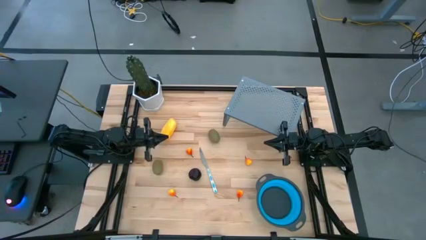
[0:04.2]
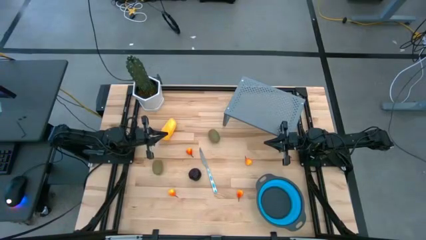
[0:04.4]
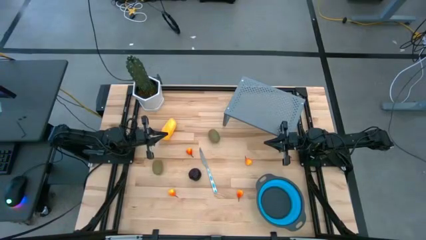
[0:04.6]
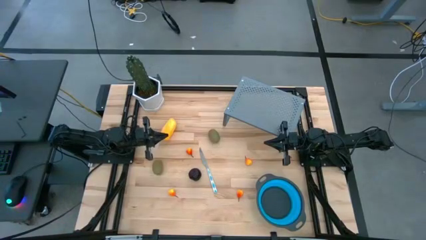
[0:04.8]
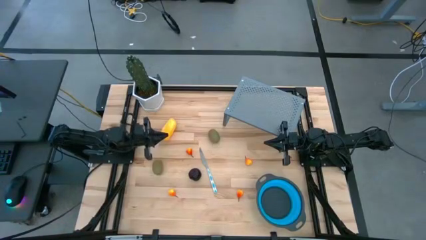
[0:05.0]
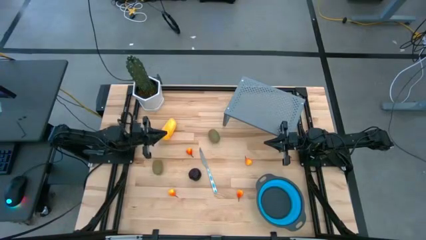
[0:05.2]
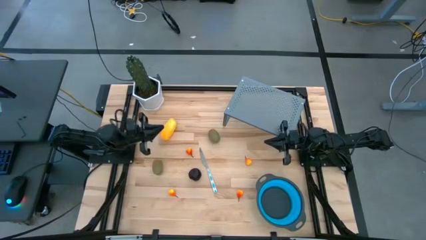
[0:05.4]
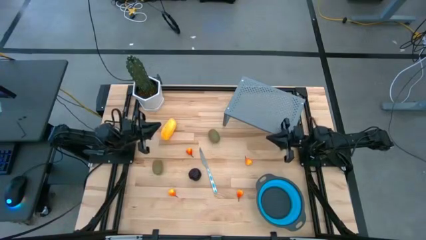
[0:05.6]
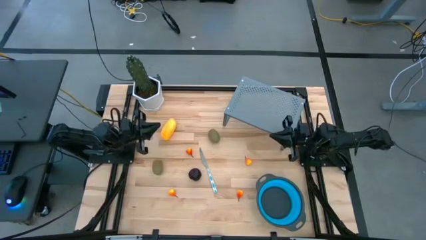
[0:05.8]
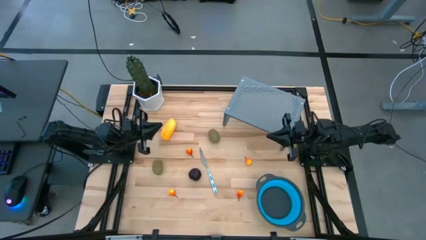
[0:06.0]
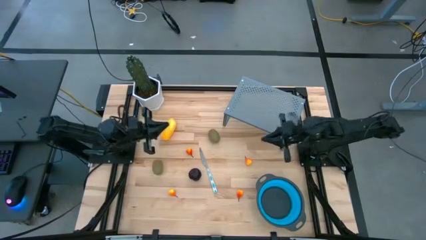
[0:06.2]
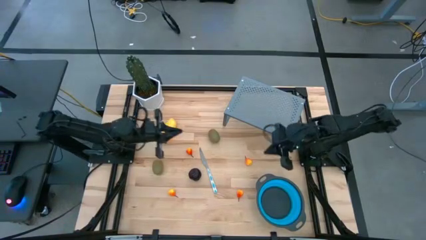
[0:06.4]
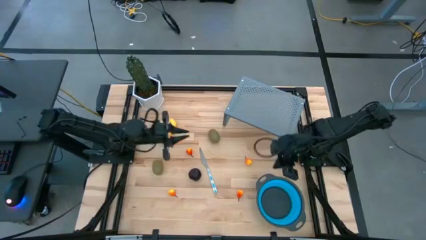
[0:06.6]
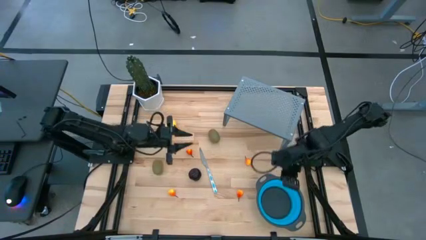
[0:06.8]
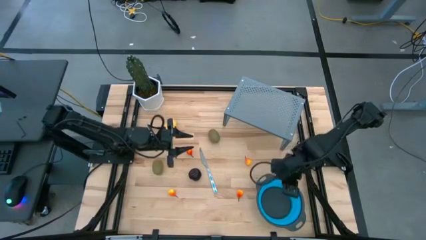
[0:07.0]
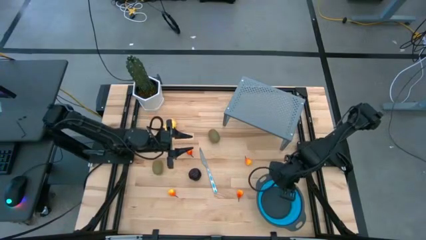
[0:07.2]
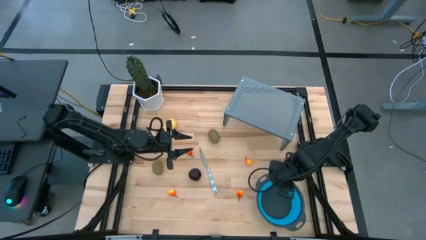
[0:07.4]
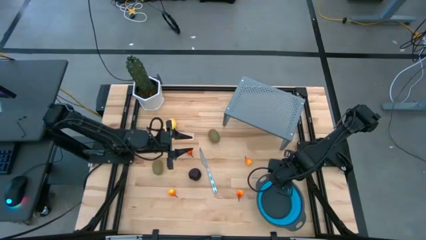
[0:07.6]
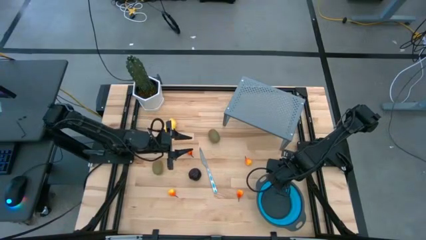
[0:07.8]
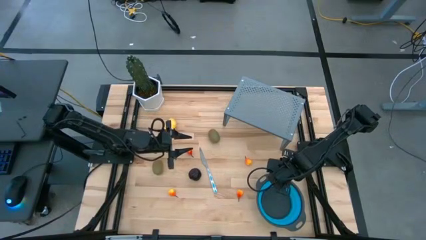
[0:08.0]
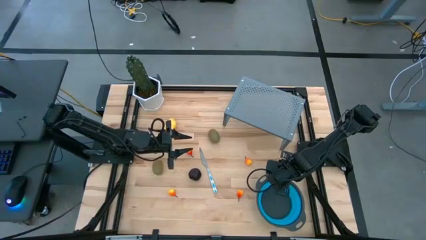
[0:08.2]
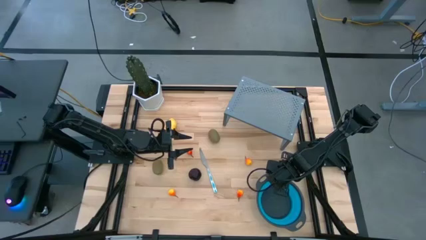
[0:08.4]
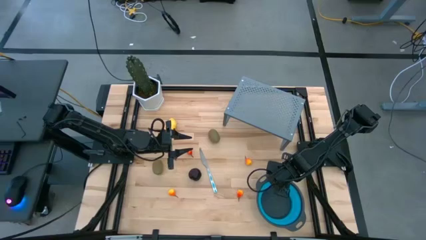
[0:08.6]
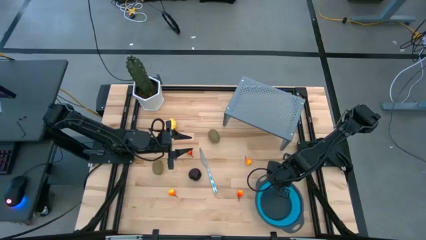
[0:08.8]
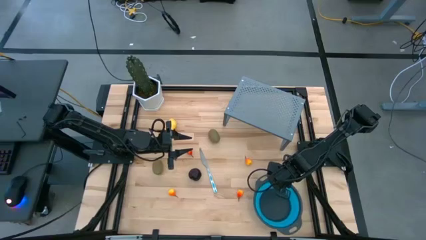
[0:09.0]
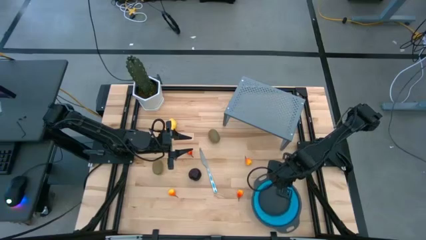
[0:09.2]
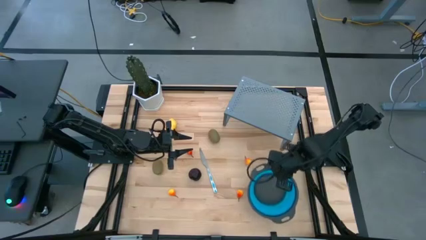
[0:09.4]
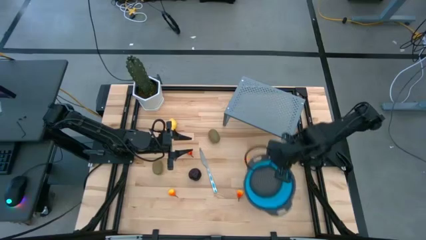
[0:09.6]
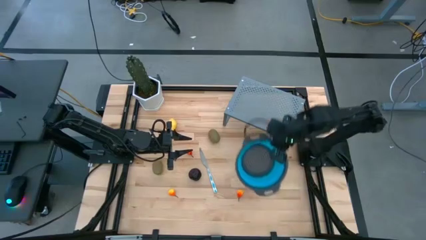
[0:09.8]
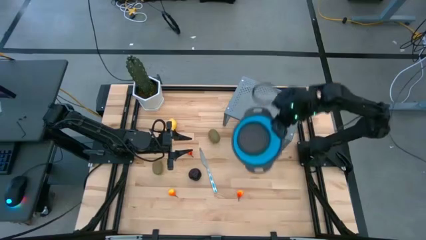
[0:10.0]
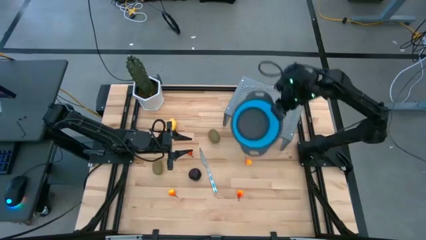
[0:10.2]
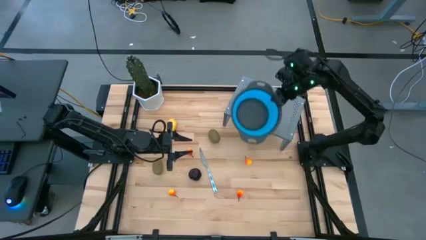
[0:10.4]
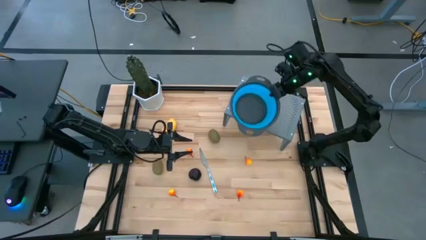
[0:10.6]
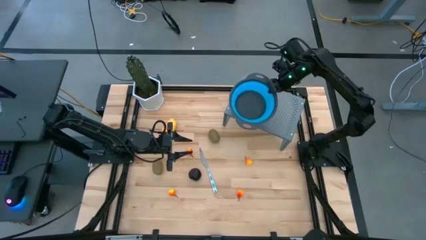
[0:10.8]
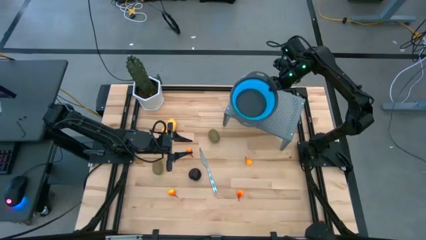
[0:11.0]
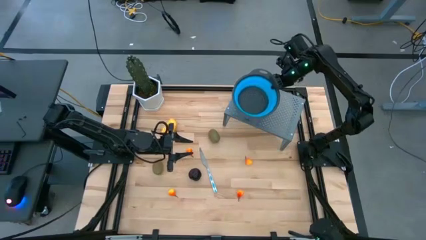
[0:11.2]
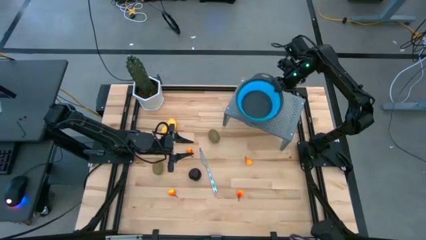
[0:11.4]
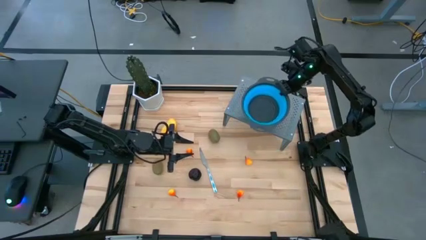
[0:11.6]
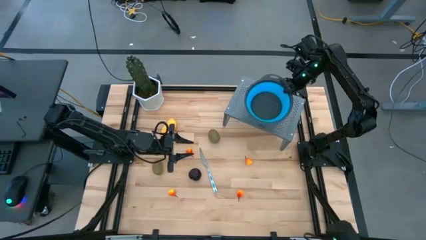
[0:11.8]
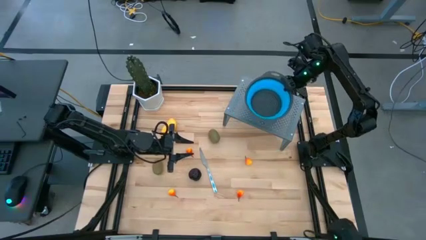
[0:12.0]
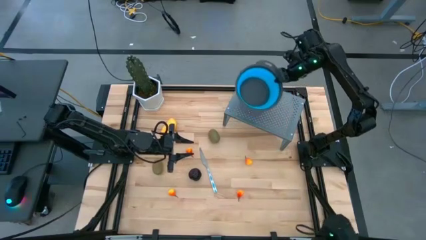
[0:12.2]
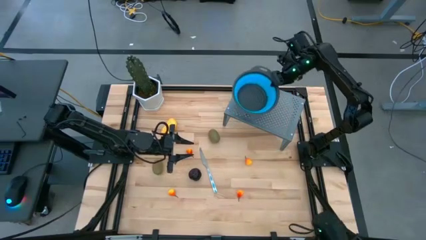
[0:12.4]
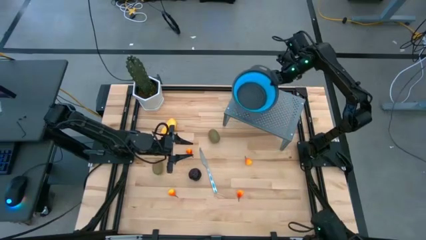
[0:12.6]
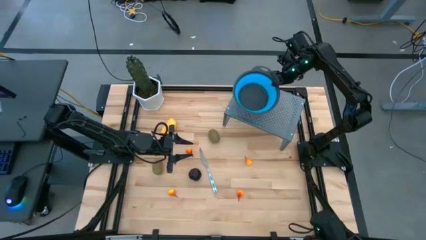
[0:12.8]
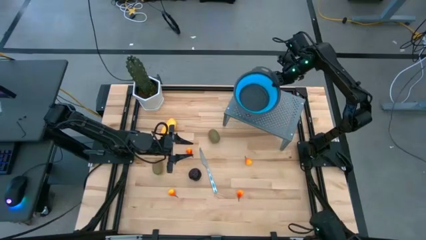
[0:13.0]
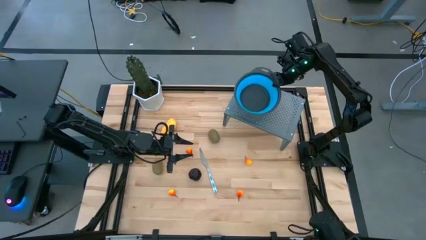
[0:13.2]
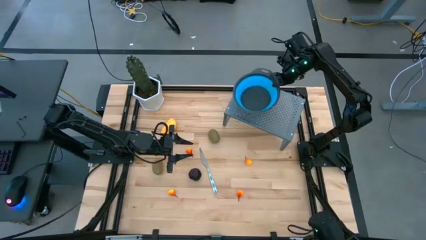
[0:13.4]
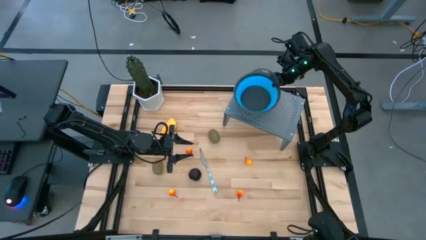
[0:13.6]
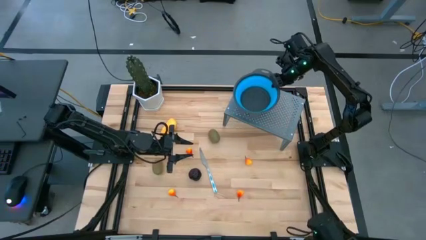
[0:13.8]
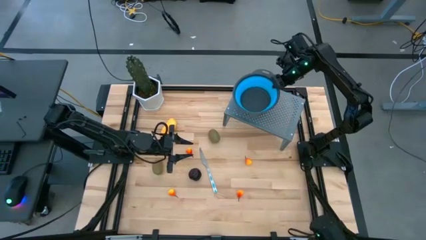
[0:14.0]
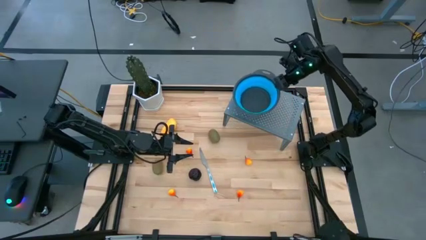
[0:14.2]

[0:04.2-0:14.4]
Task: Pick & Place Fruit
Put the blue strainer bowl on the shelf

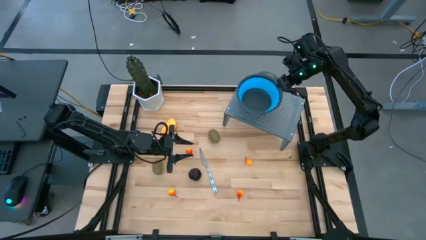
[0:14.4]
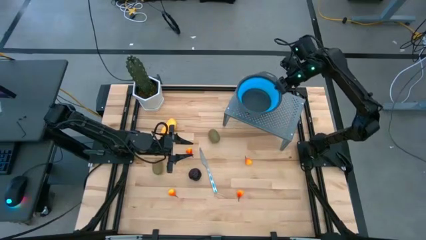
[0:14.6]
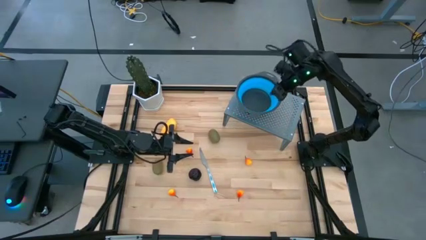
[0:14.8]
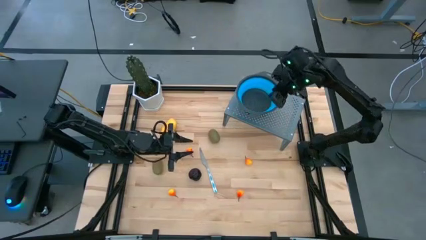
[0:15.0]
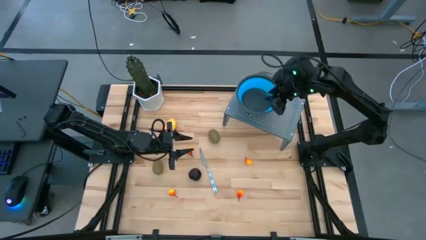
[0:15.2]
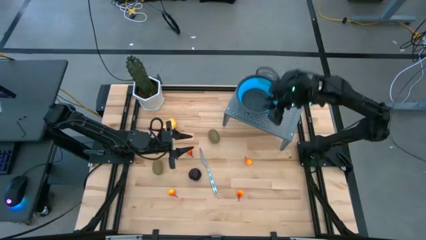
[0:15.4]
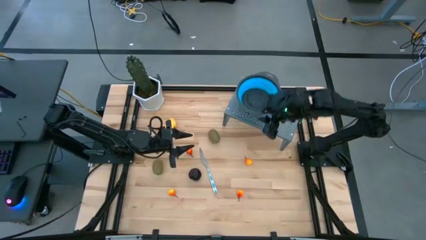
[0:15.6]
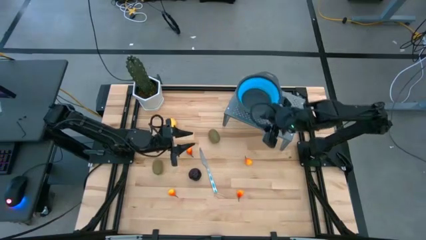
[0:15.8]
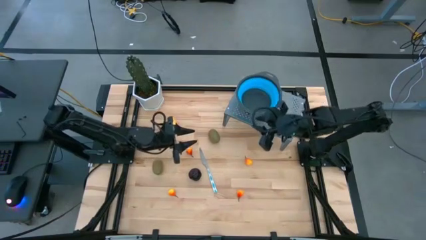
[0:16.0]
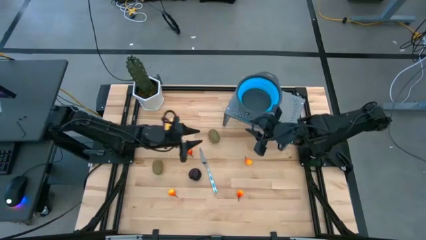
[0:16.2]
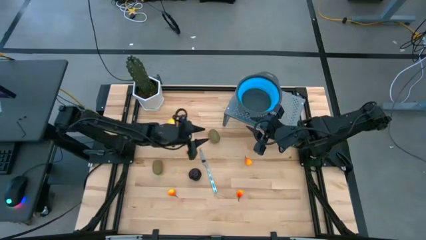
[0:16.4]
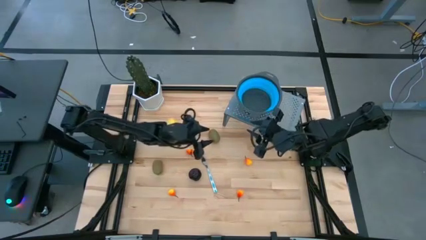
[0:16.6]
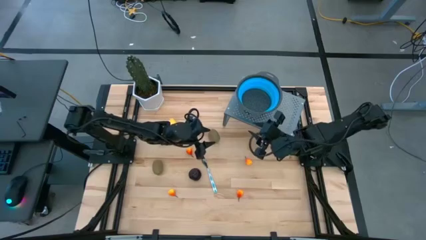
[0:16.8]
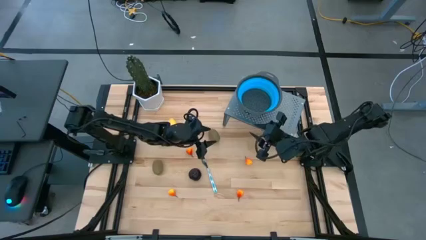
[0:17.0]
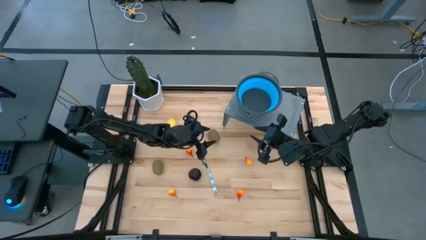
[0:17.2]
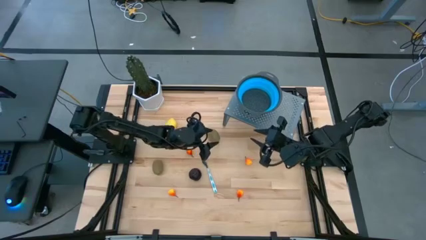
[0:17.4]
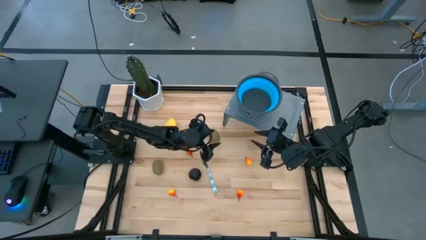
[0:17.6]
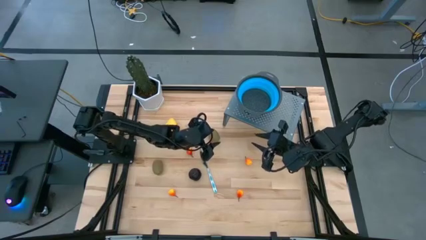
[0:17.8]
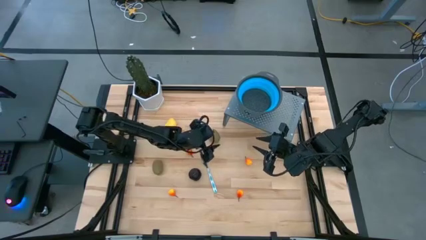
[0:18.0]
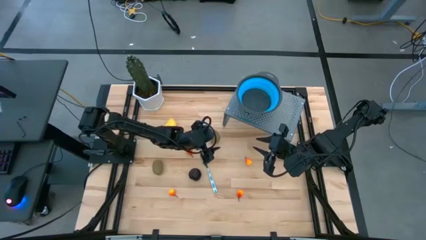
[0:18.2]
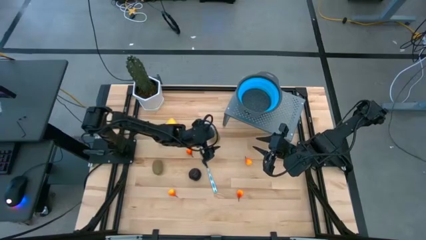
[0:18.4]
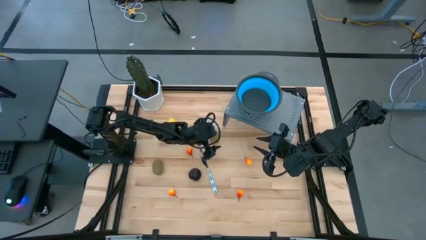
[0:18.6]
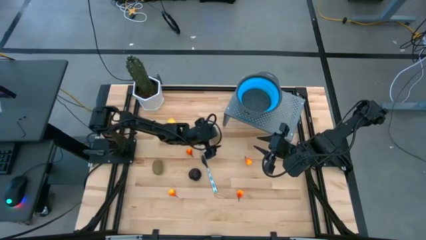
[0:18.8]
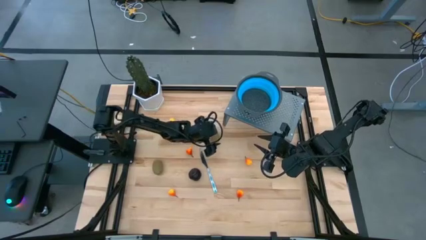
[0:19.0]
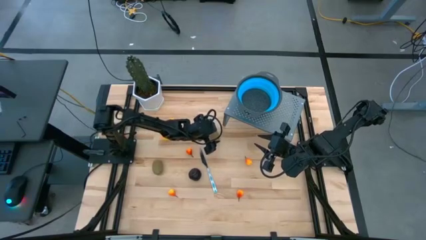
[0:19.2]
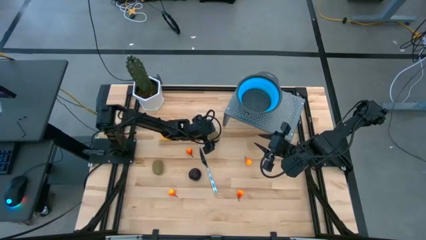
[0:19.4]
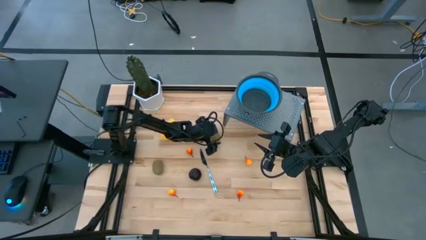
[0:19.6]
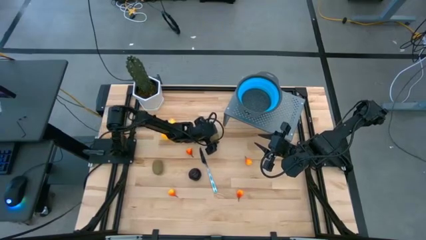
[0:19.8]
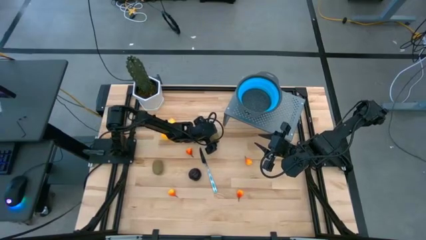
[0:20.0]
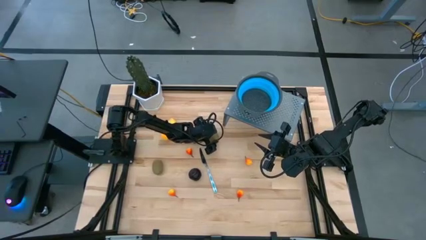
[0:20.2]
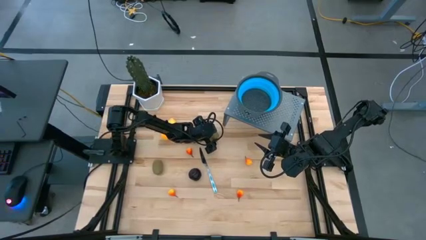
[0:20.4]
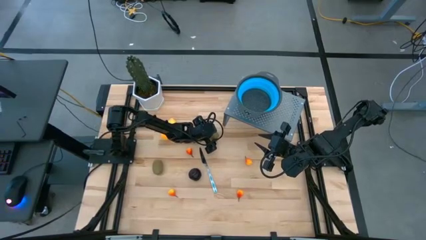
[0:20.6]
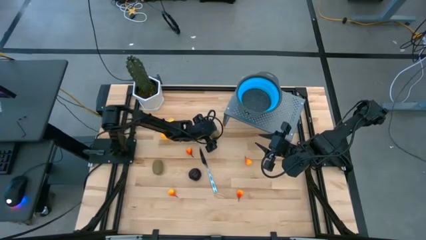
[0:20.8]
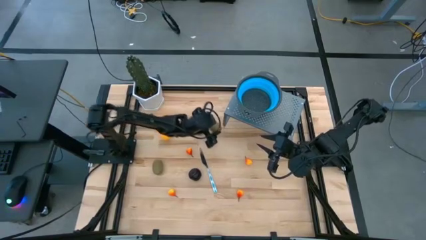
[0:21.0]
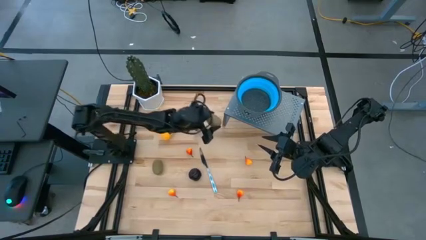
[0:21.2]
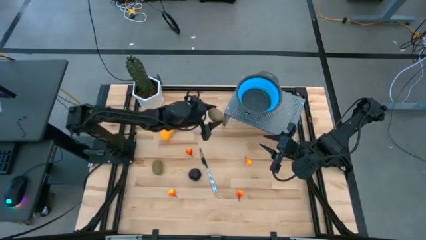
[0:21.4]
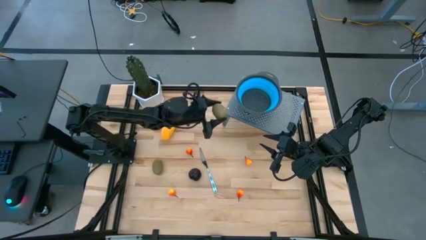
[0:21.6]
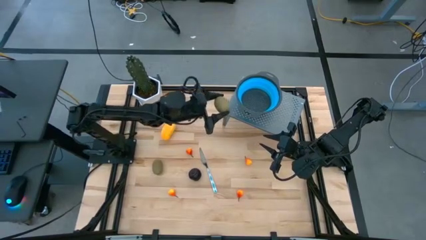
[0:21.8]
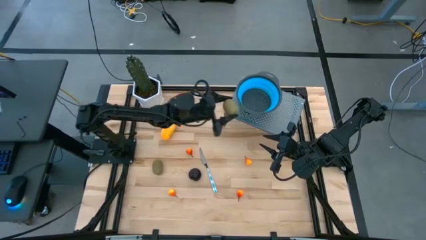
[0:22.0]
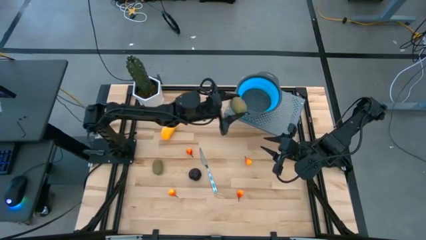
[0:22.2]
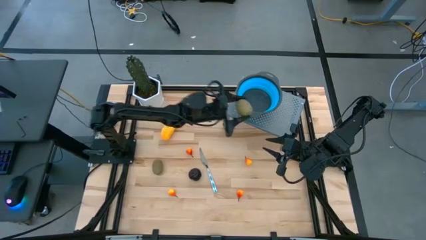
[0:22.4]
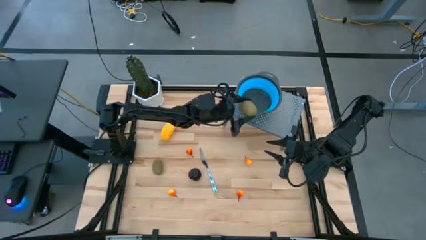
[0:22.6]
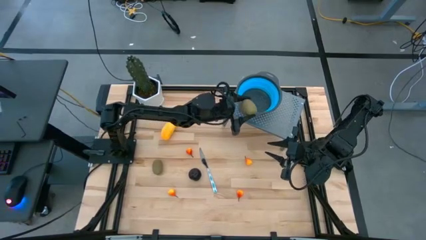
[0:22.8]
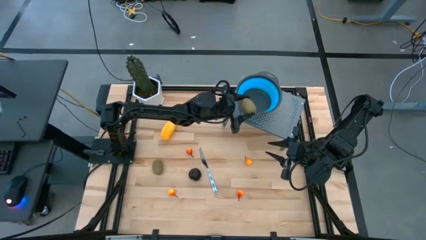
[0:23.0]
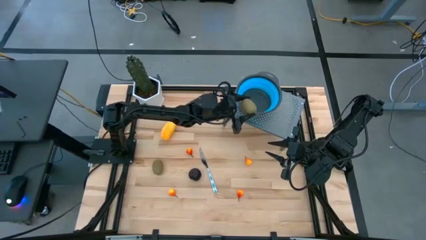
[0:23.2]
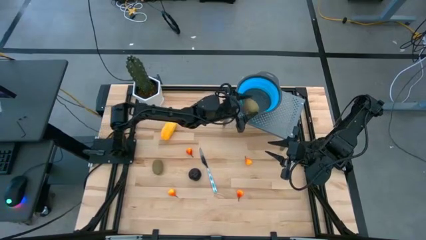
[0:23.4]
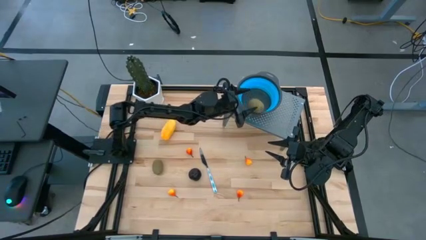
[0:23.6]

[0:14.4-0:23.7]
Put the brown kiwi in the blue strainer bowl on the shelf
